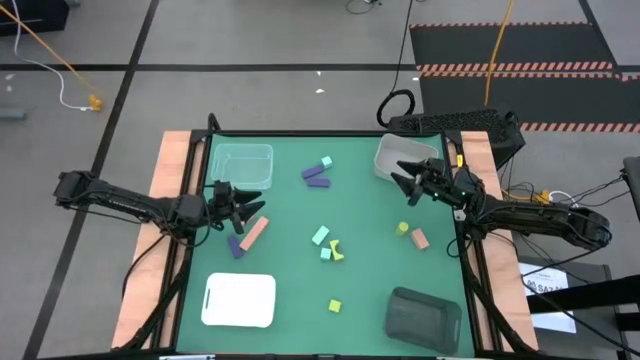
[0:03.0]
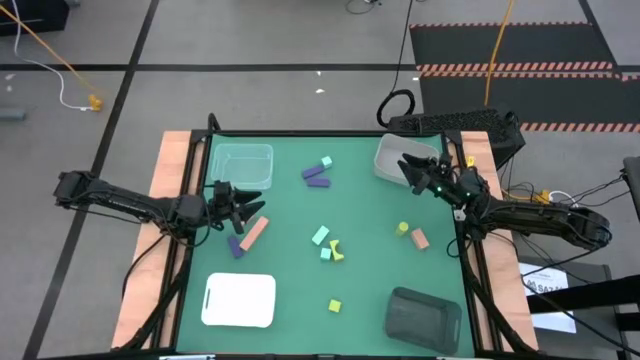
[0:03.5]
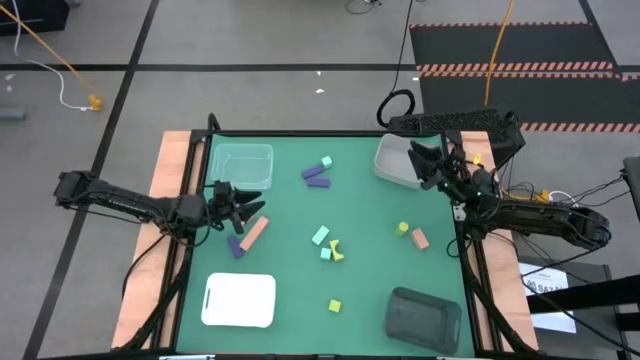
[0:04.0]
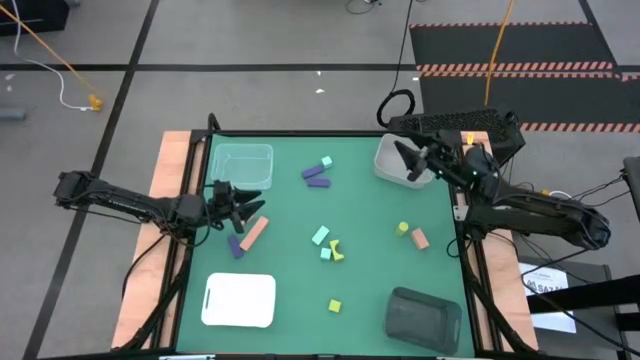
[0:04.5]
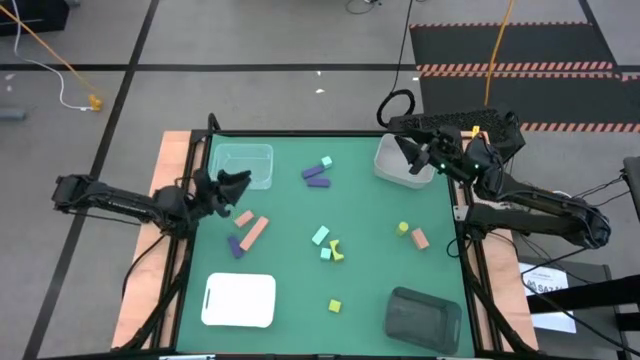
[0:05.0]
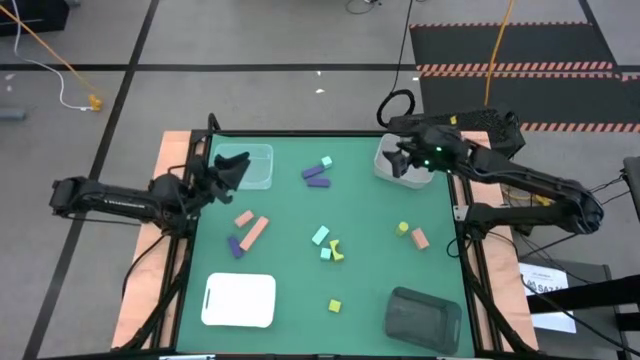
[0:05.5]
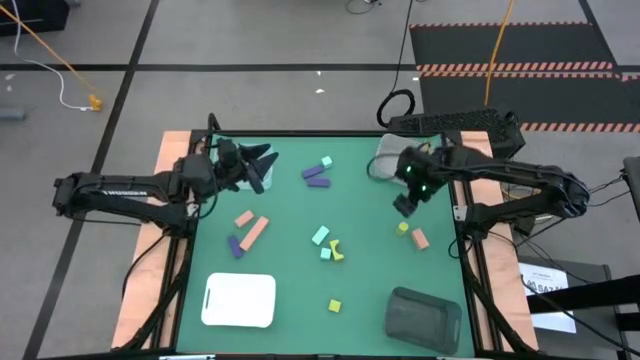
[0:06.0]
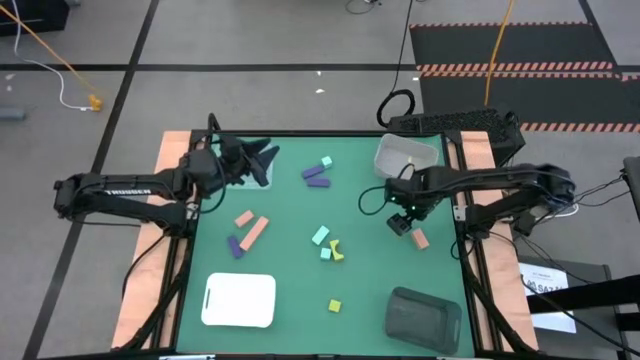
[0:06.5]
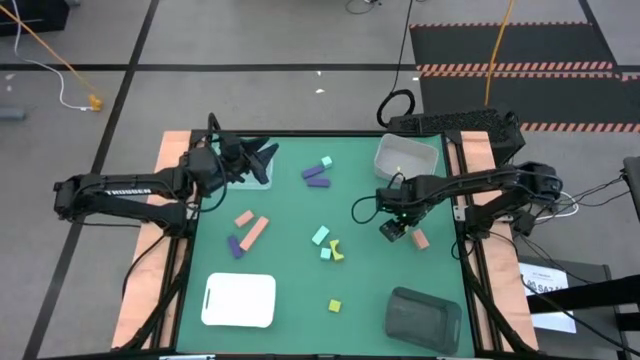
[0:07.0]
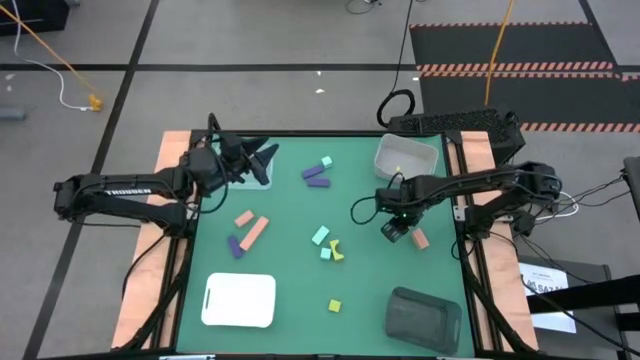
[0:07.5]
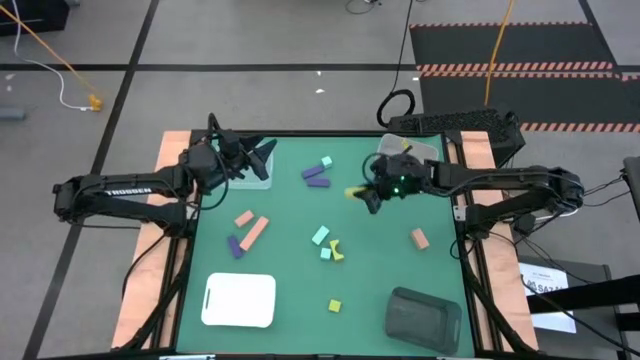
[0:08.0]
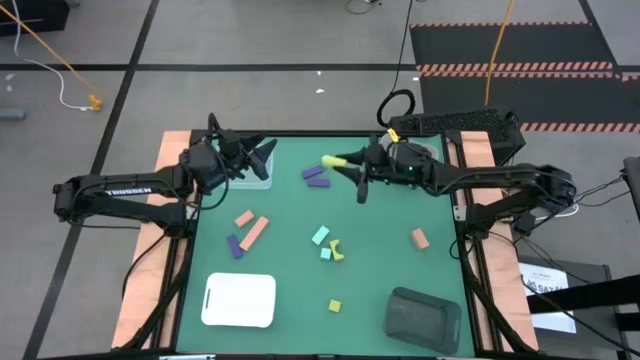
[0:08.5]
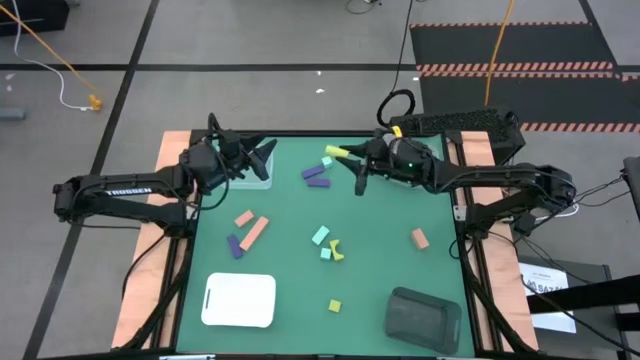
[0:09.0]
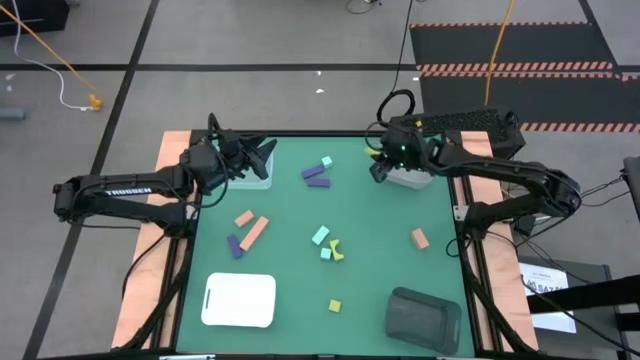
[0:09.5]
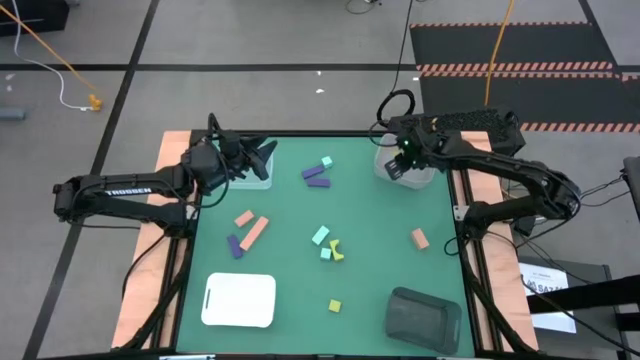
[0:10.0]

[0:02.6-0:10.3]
Task: Sort & place blocks by color
Put the top light green block into the gray bin

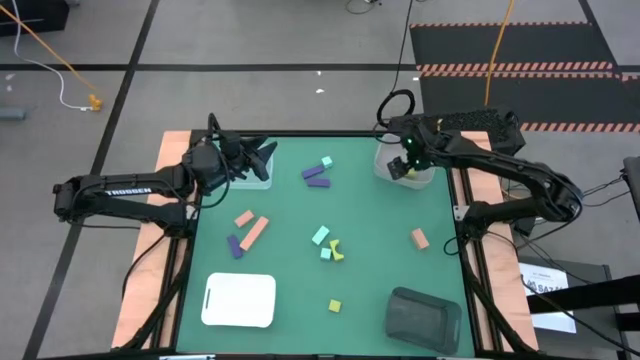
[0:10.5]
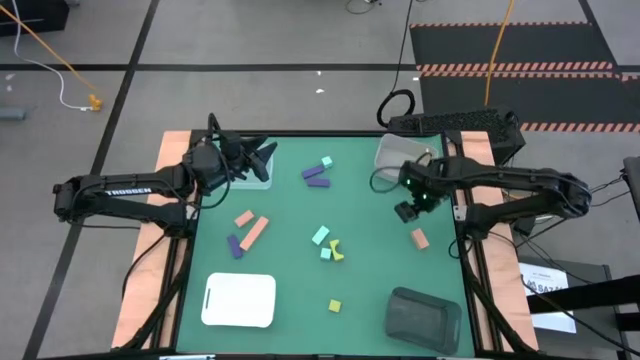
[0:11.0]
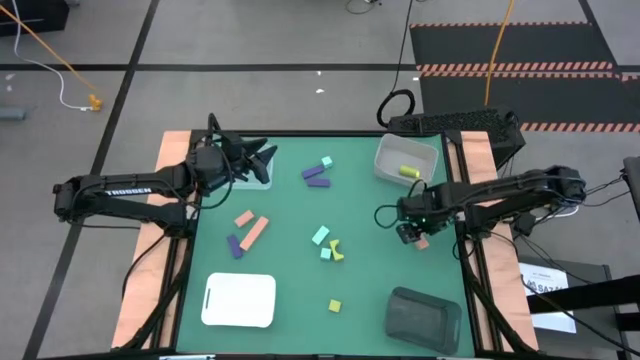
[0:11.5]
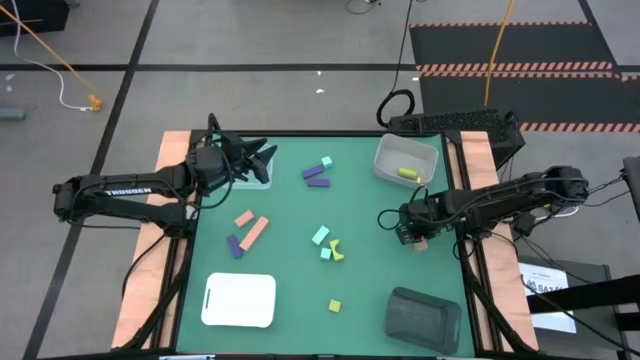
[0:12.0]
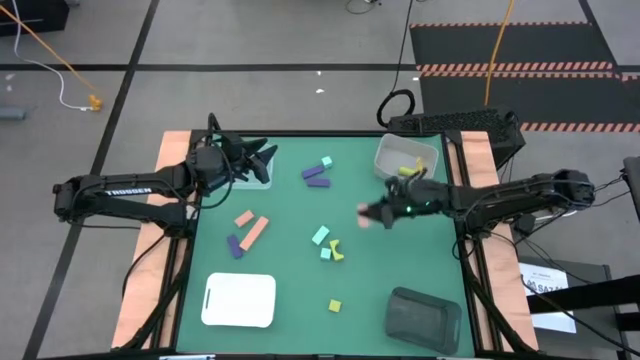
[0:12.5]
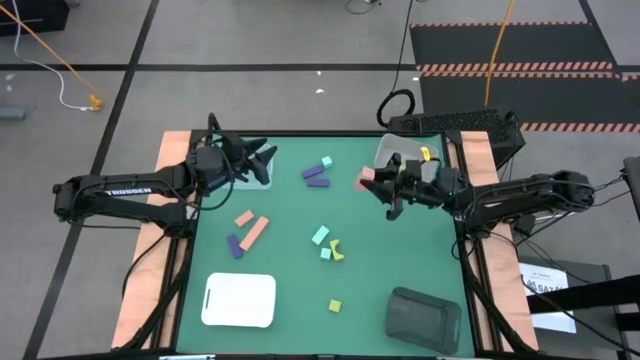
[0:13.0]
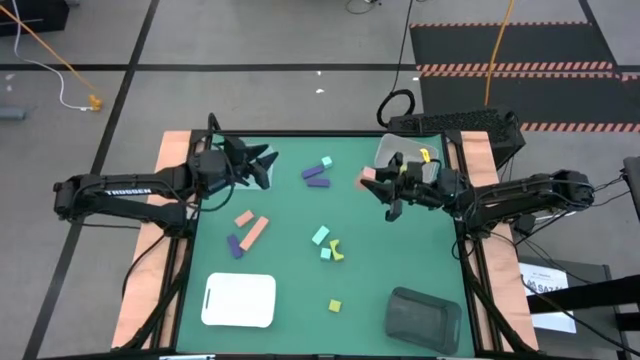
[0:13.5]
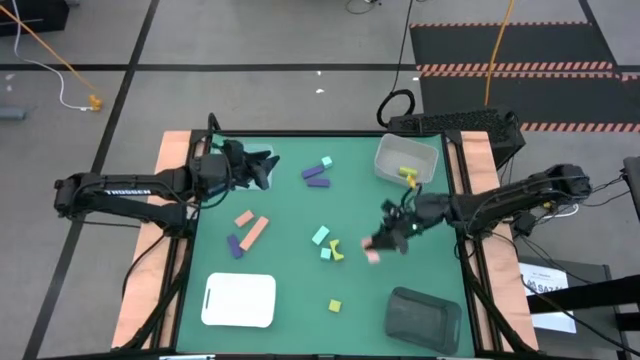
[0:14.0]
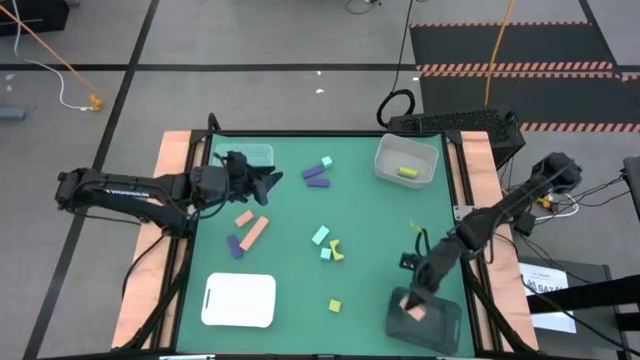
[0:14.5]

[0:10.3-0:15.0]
Put the bottom right light orange block into the black bin

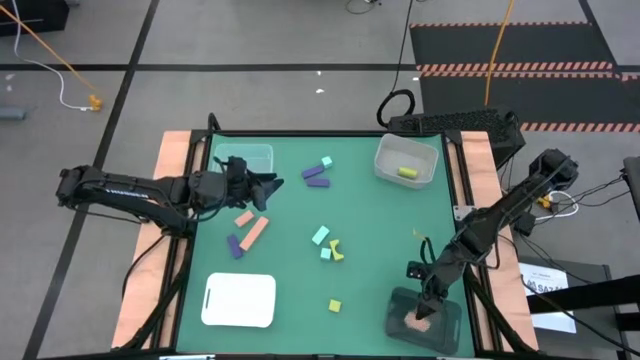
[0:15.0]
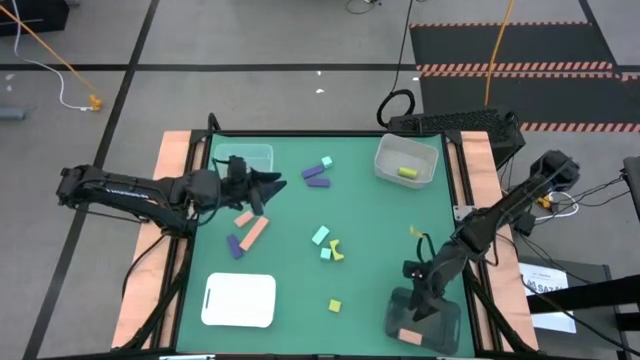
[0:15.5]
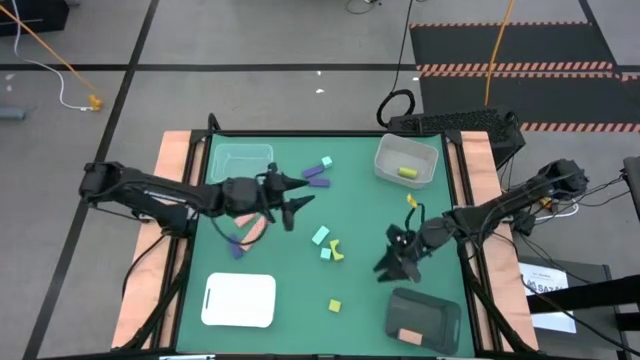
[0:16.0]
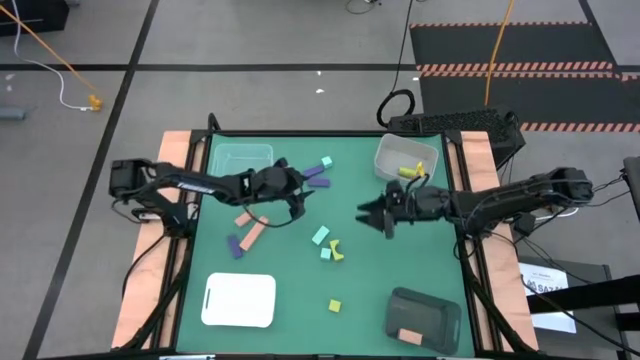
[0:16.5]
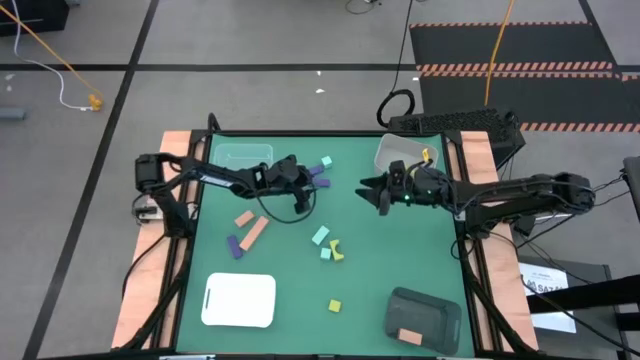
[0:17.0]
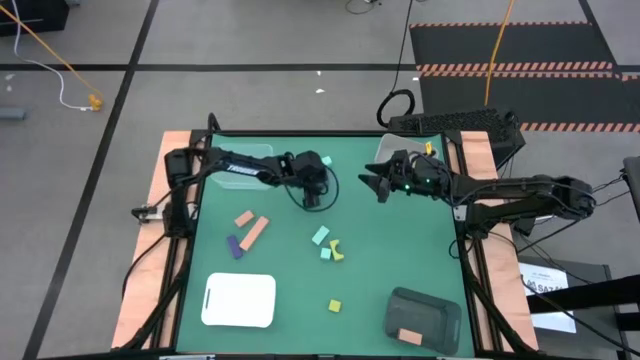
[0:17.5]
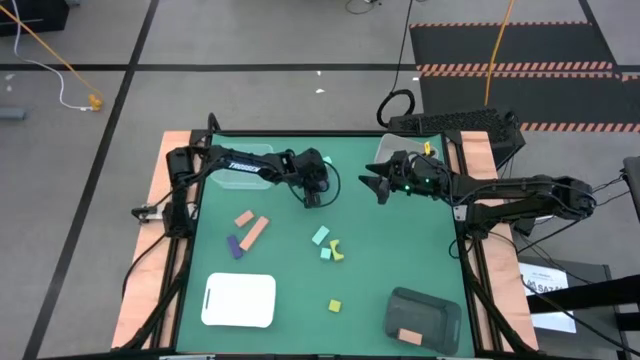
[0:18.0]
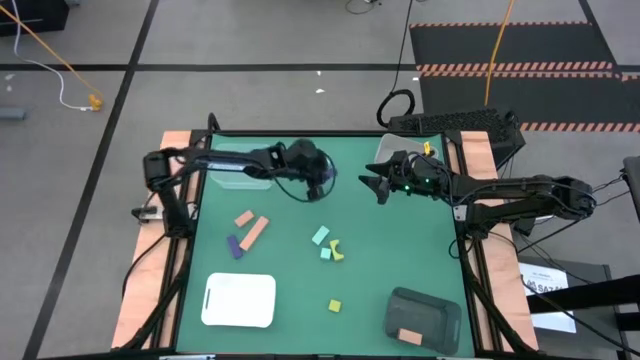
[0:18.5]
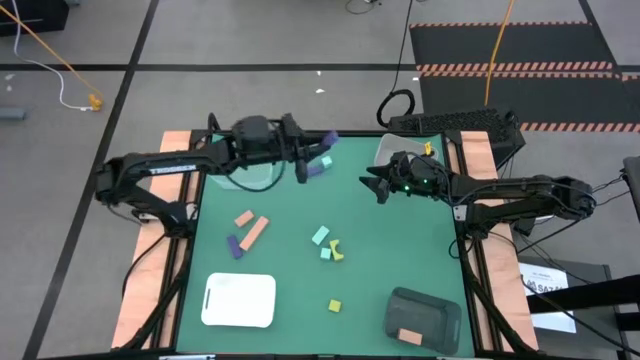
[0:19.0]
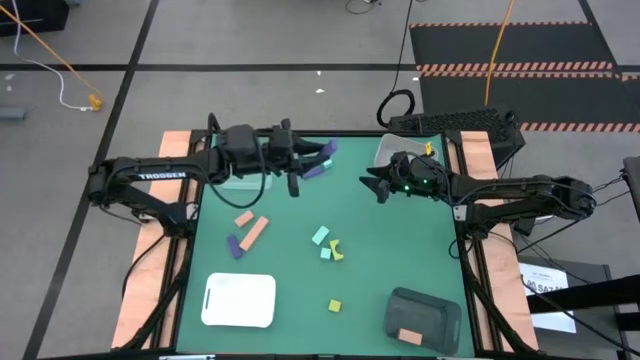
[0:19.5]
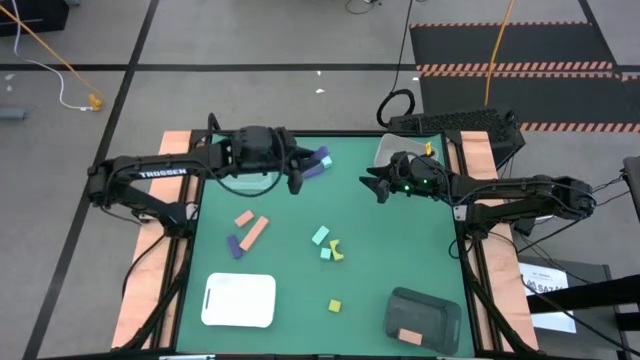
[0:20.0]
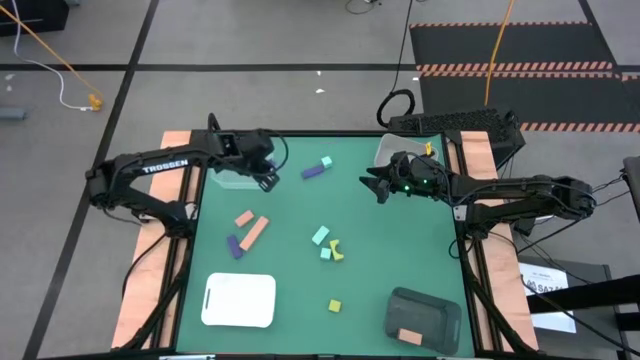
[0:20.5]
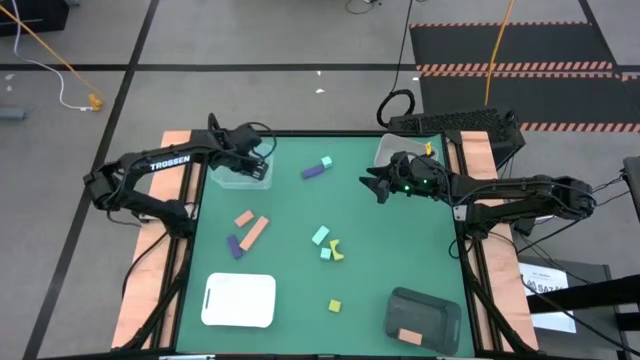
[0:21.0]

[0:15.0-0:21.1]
Put the middle violet block into the transparent bin

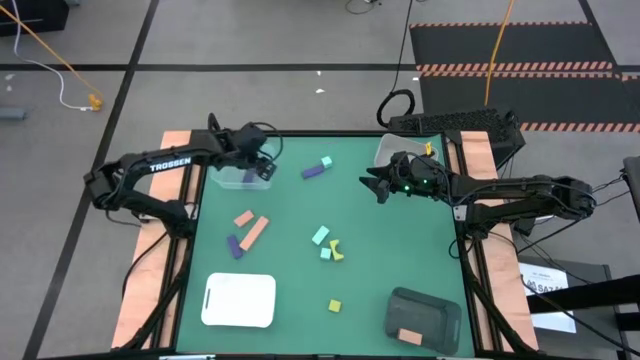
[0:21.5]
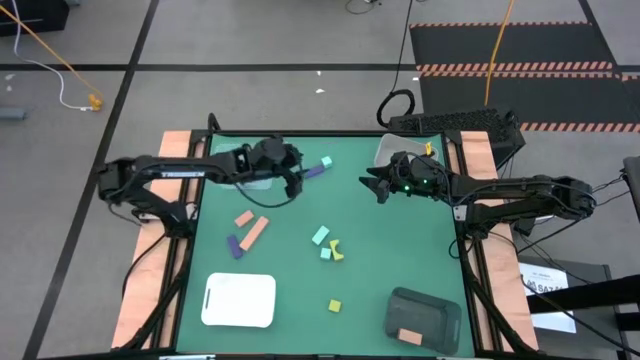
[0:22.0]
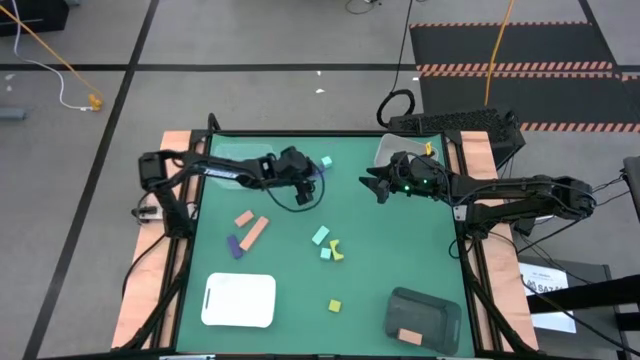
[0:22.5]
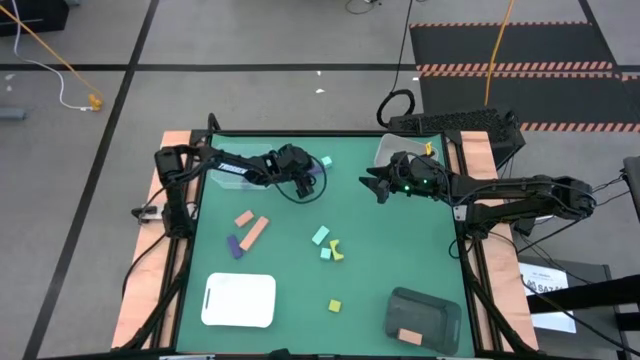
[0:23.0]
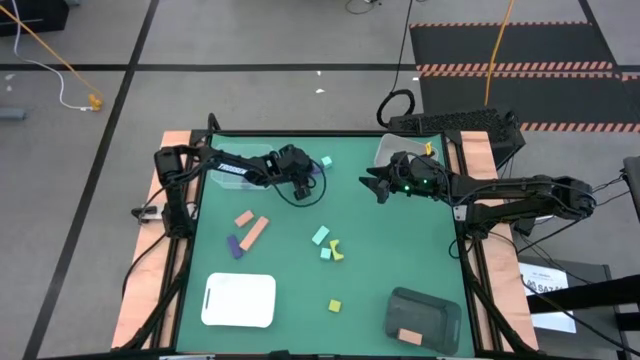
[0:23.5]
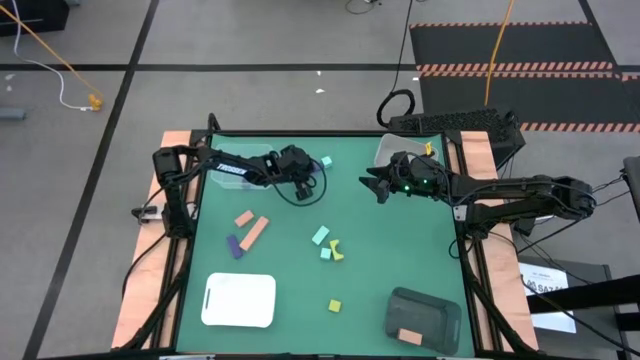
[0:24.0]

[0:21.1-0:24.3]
Put the top violet block into the transparent bin
